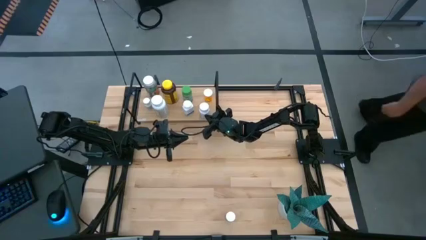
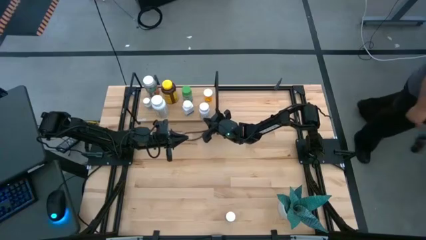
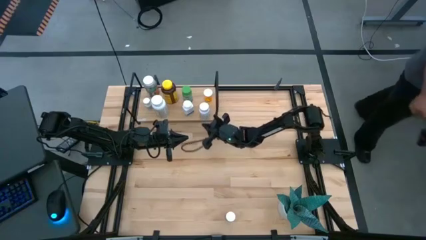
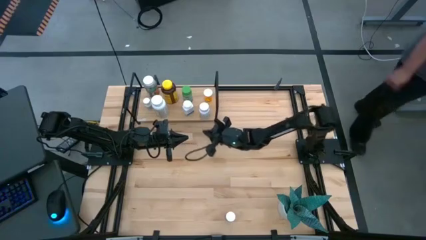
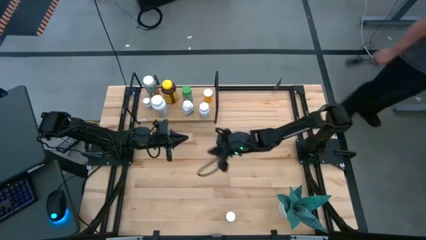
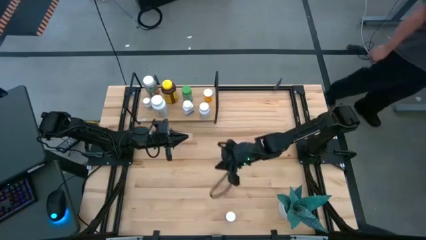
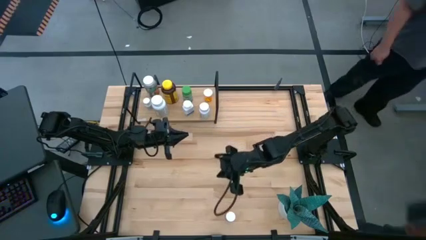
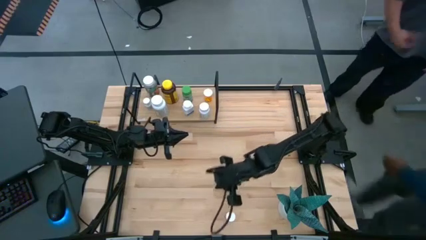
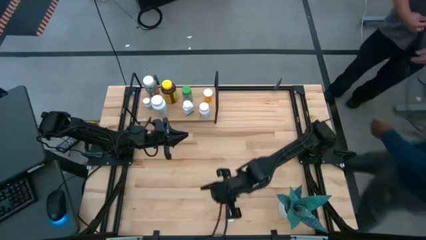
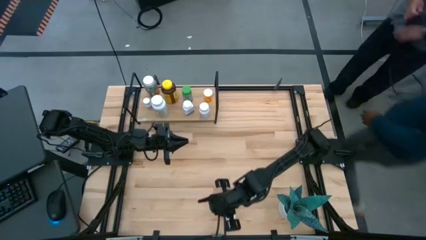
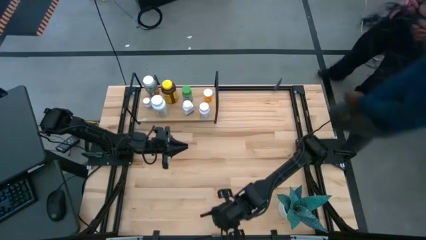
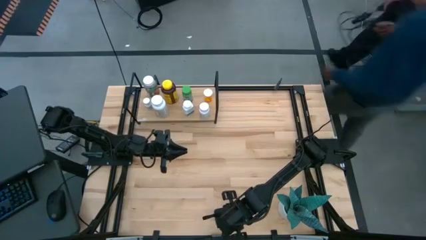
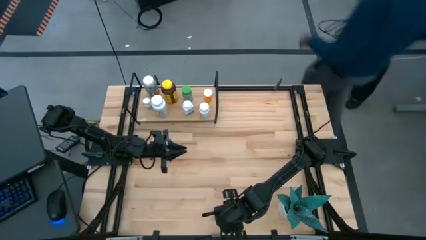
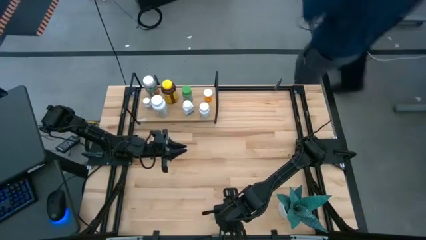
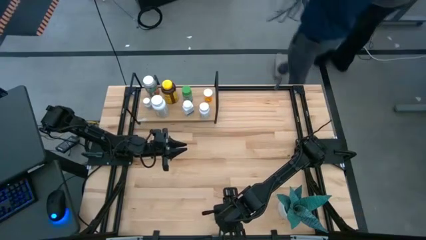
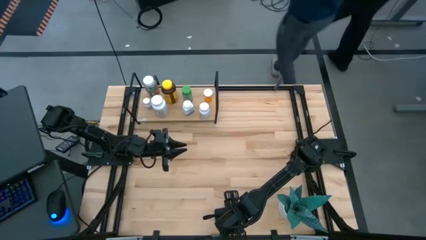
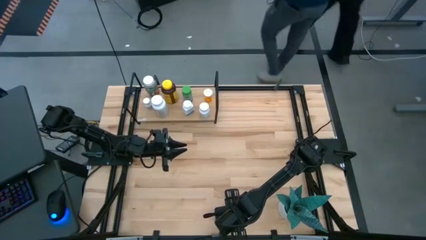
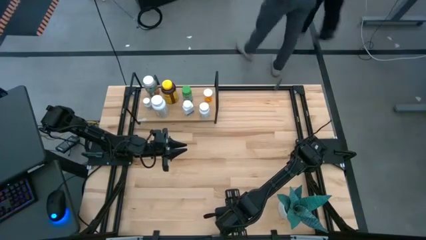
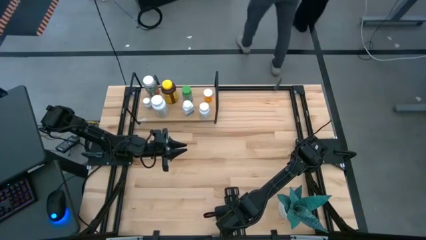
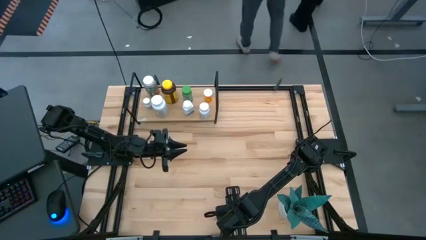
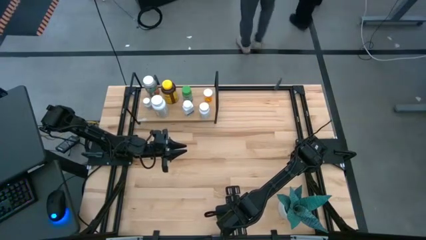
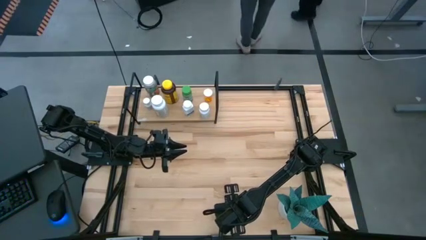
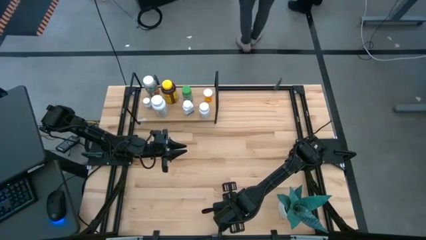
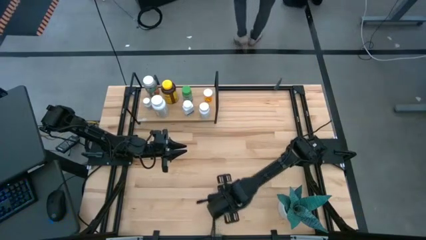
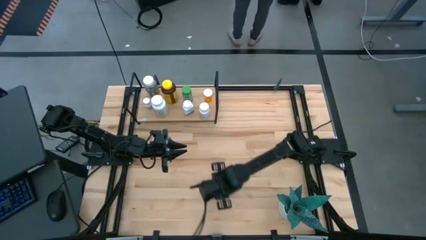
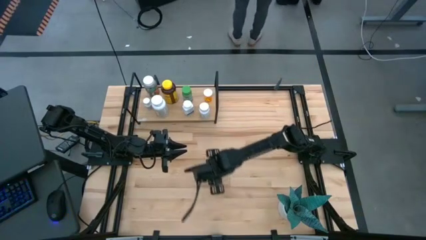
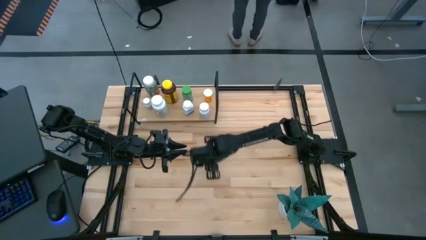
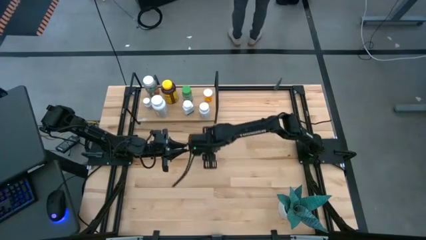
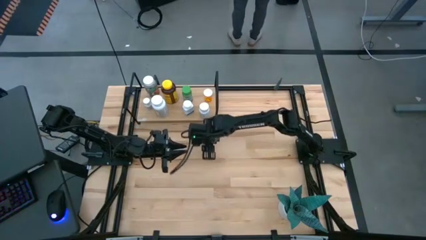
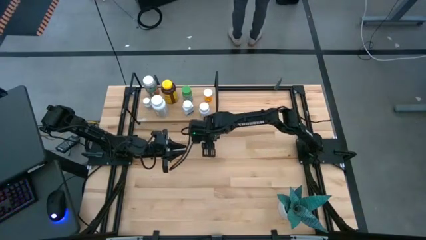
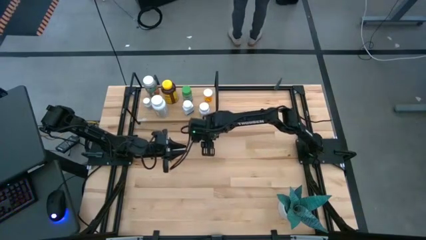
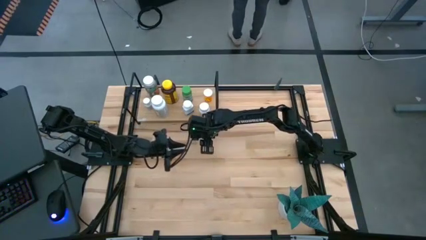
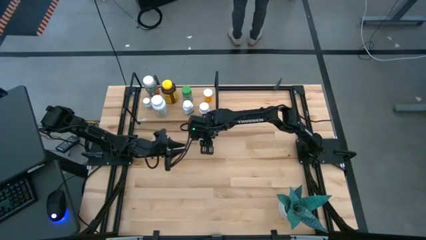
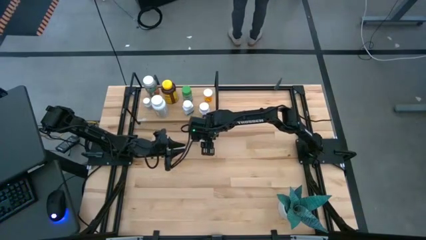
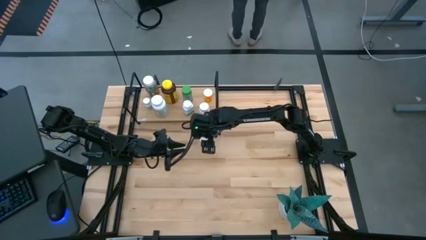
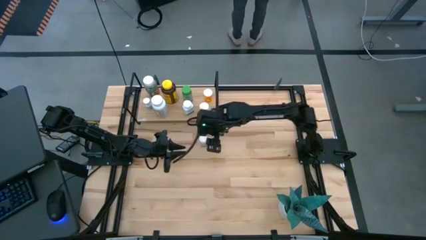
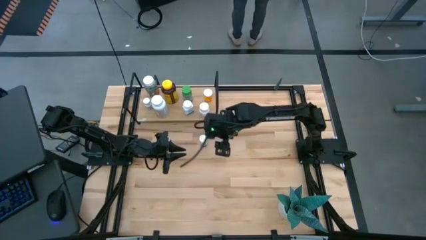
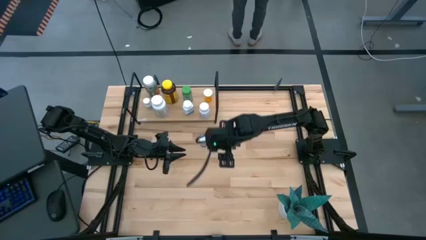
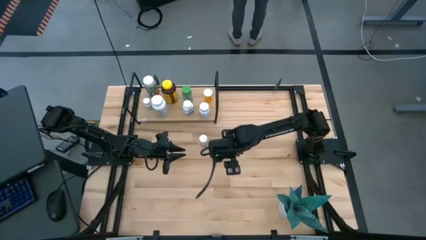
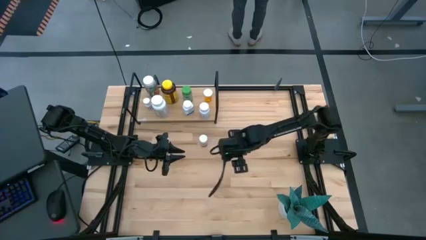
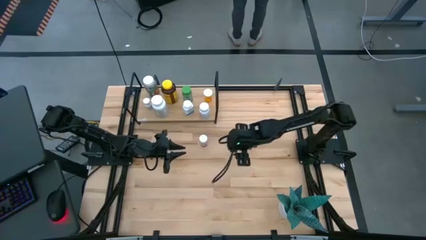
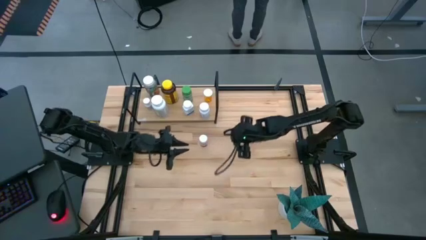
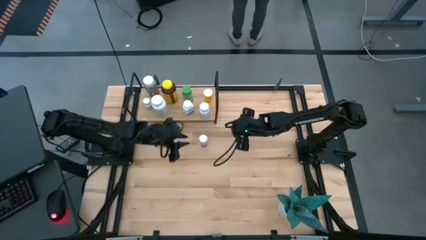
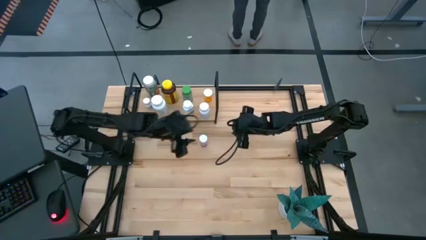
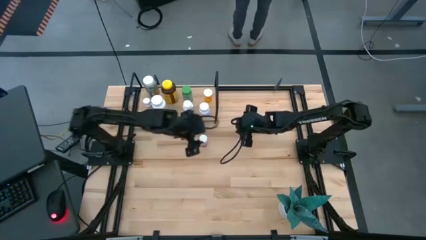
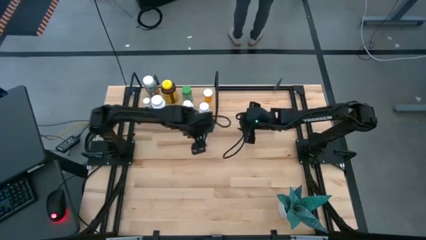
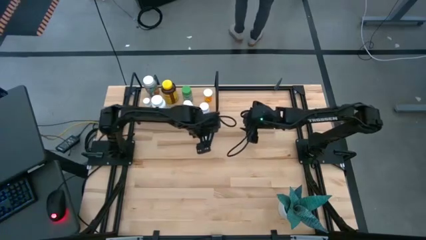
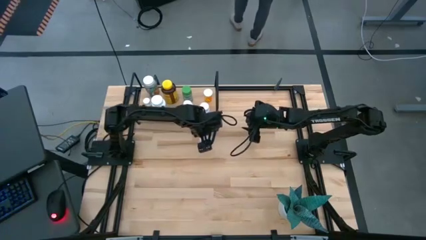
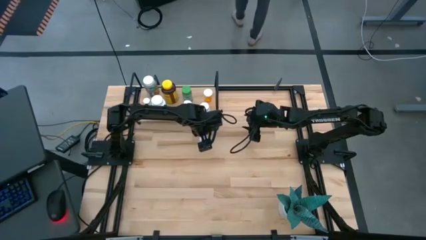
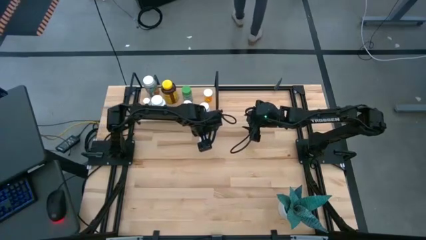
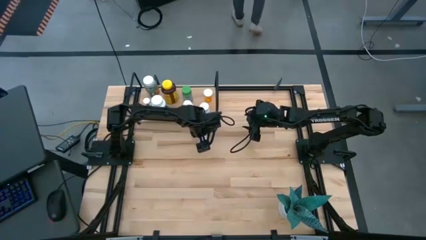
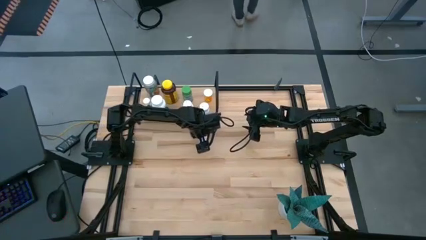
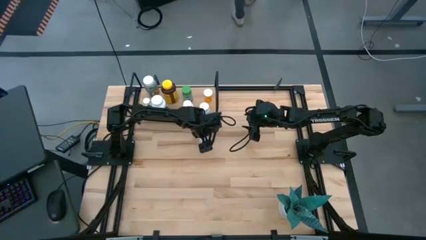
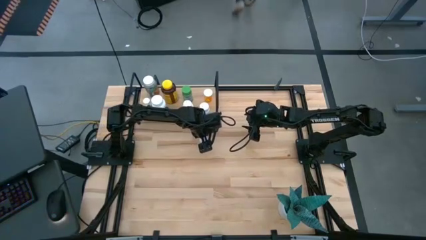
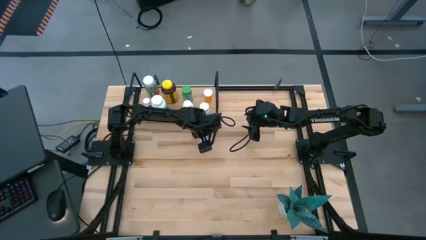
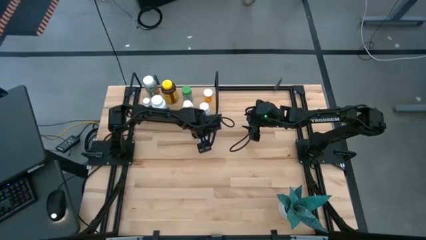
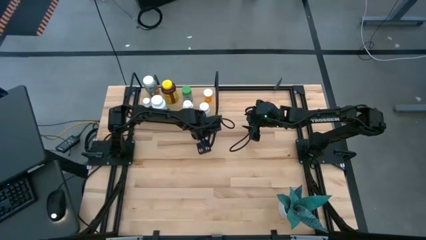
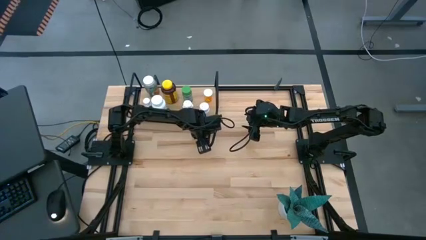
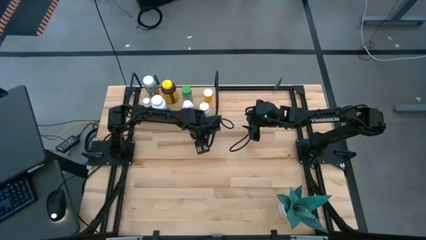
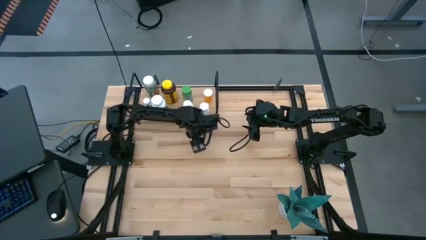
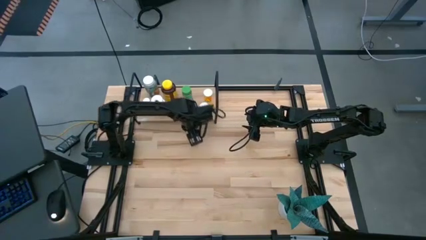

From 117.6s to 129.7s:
Task: Pick and place medicine bottles onto shelf by color
Put the pink medicine bottle on the shelf

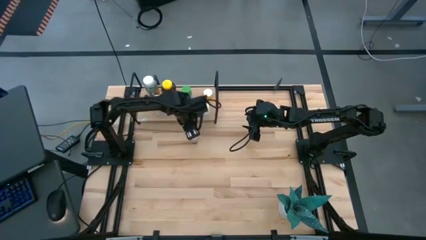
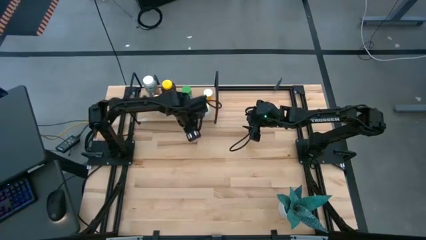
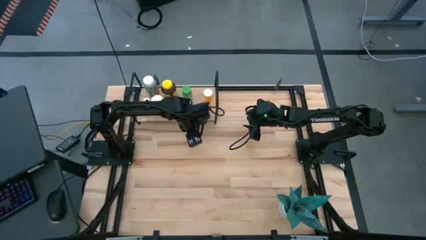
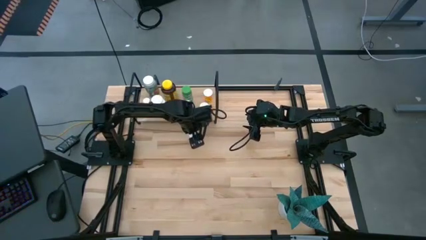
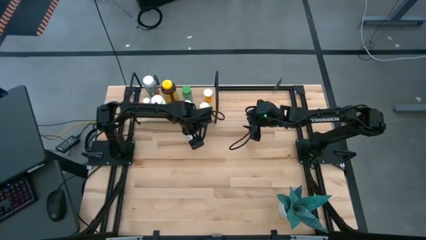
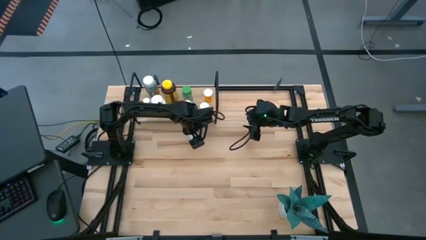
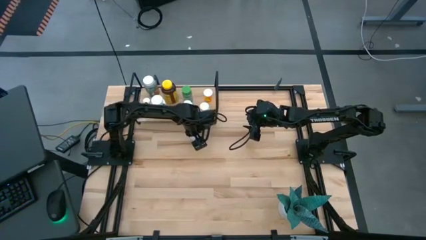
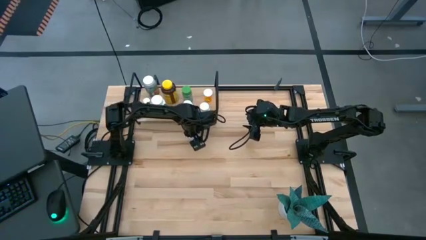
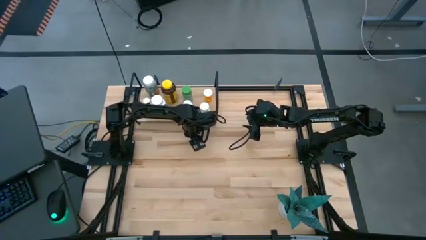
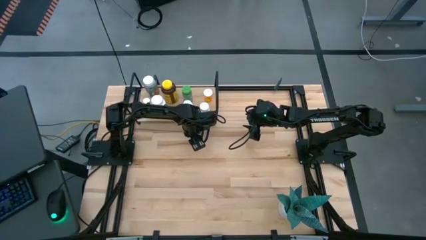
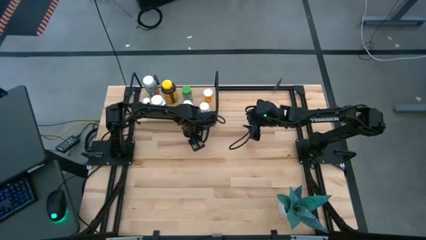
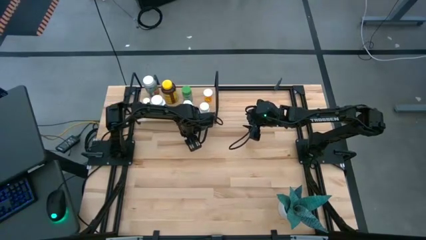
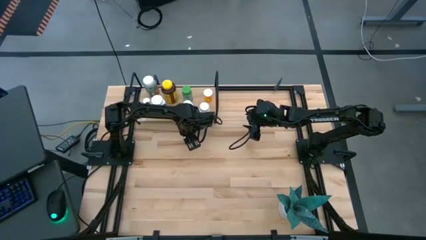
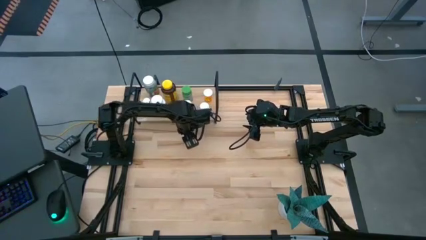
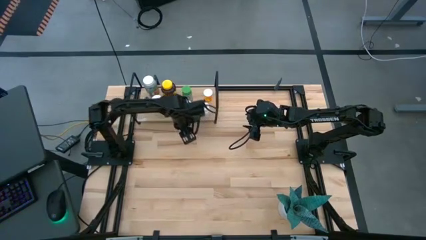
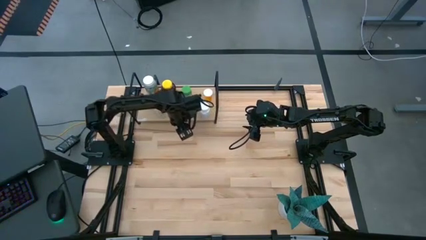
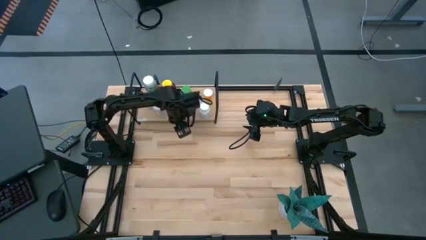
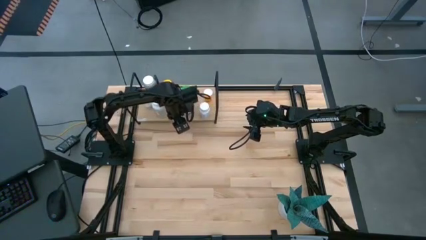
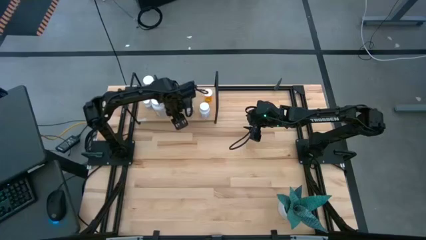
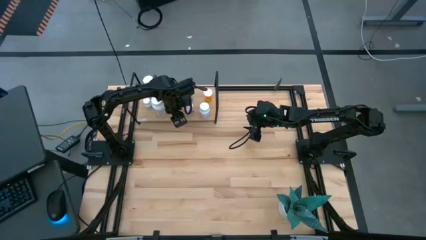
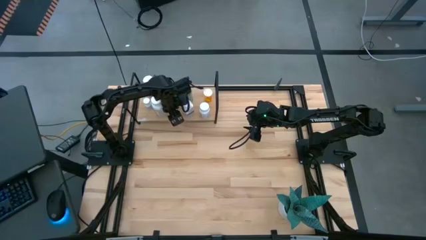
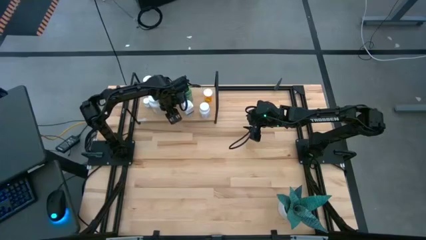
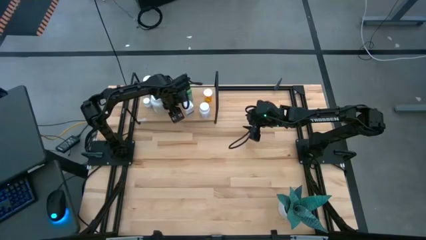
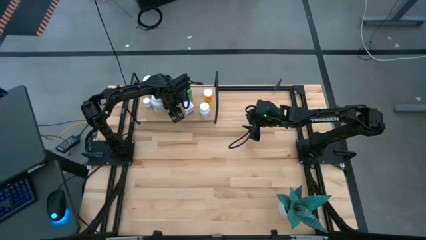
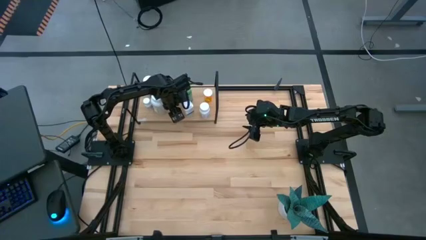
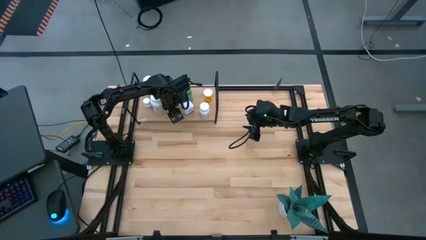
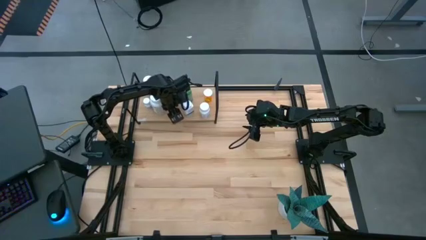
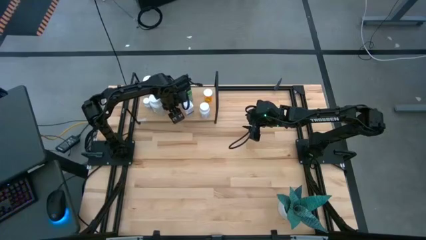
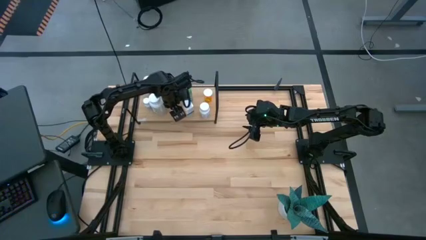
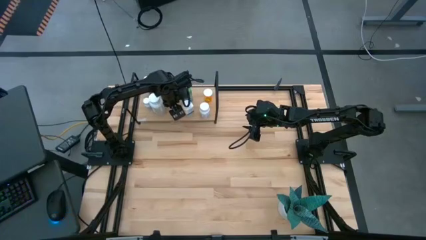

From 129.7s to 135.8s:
Put the pink medicine bottle on the shelf
